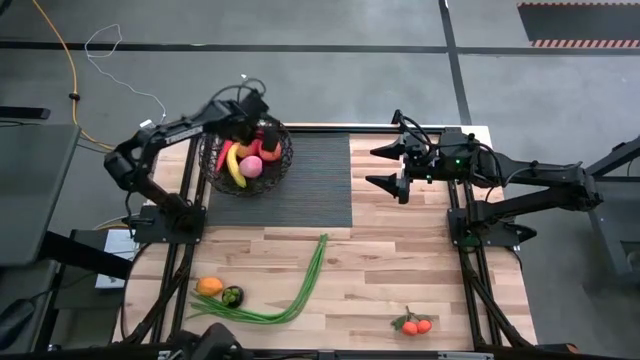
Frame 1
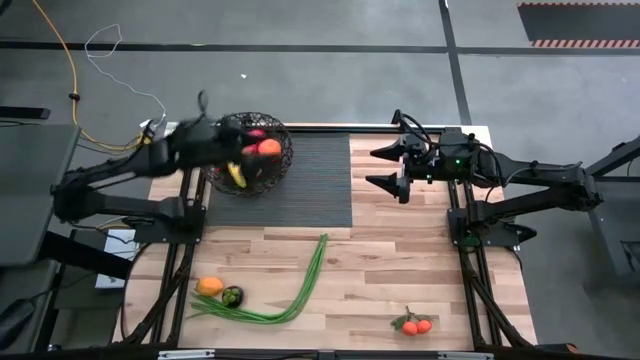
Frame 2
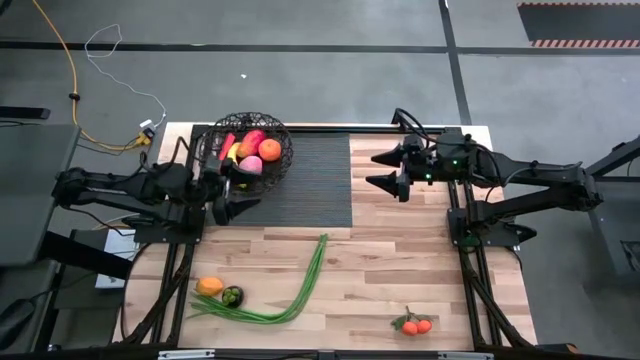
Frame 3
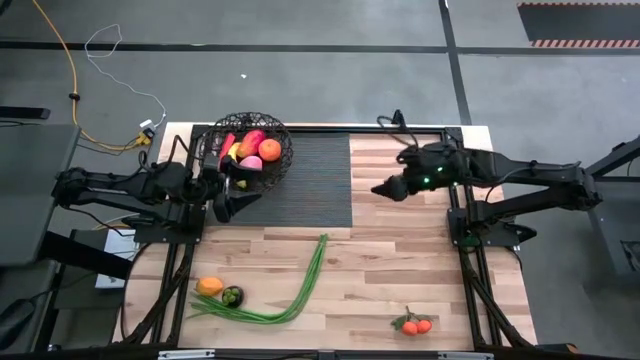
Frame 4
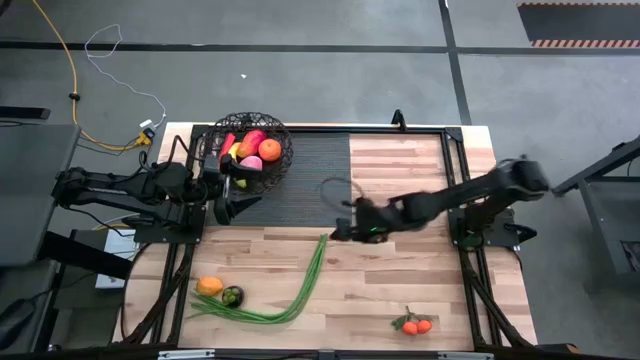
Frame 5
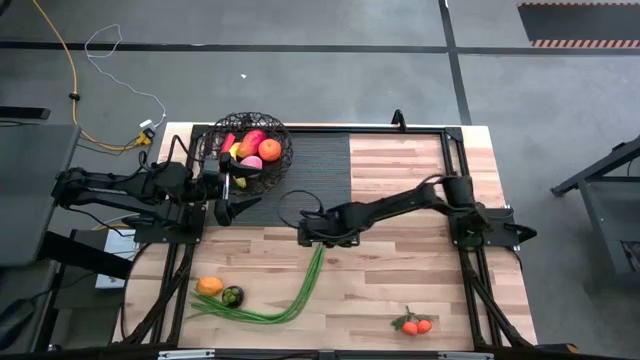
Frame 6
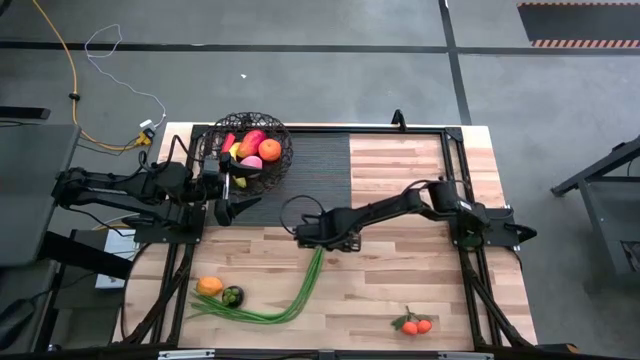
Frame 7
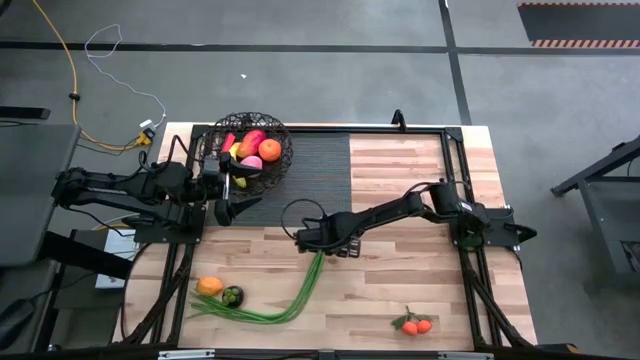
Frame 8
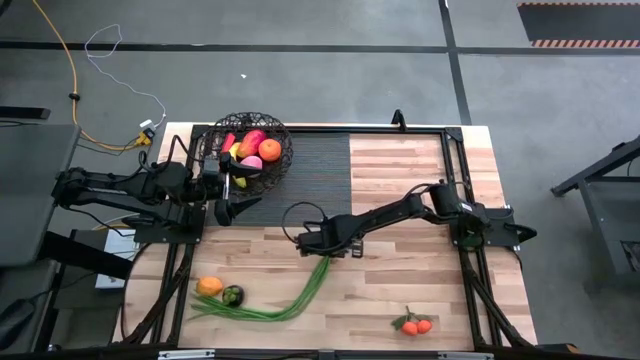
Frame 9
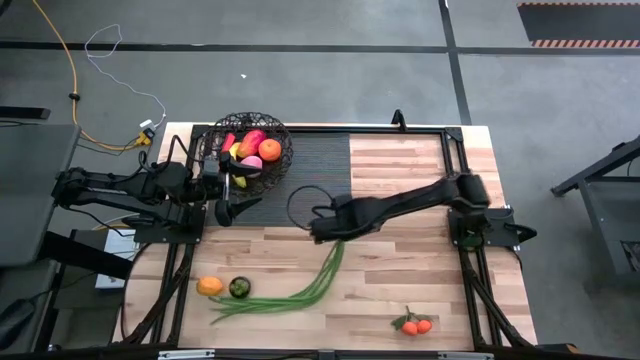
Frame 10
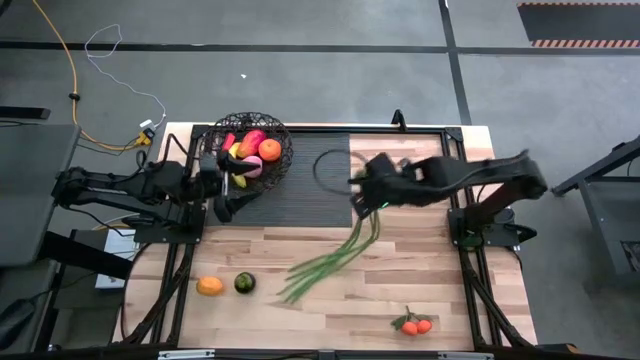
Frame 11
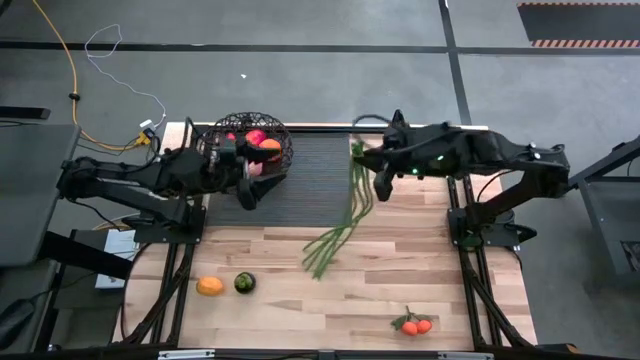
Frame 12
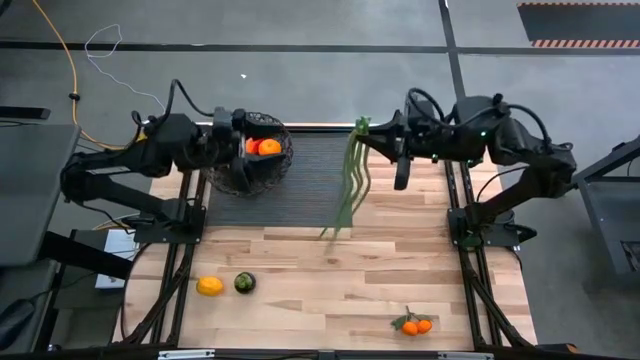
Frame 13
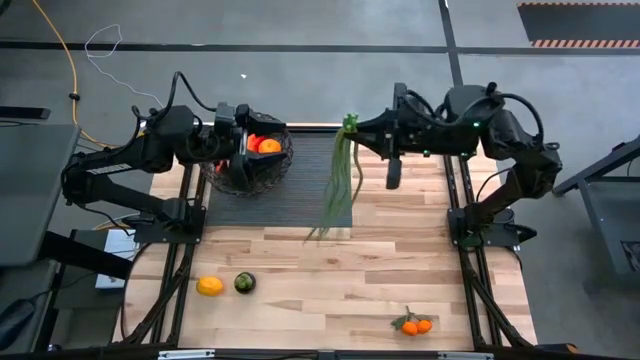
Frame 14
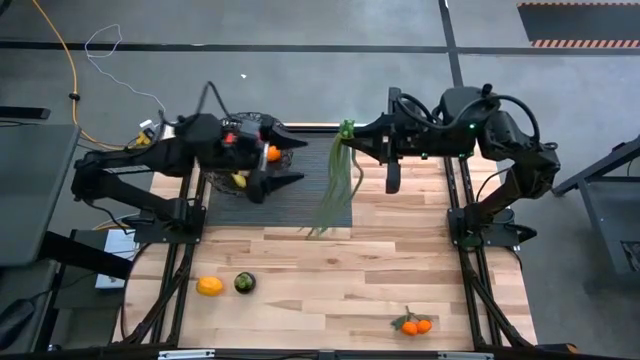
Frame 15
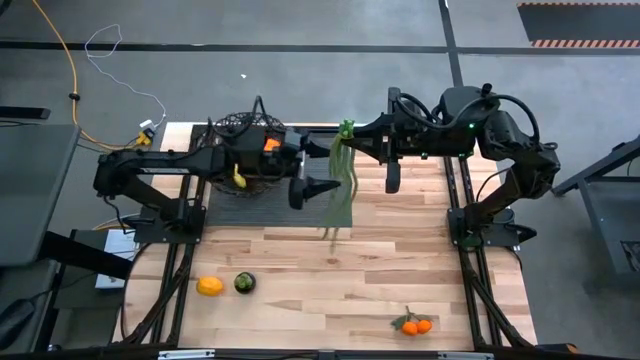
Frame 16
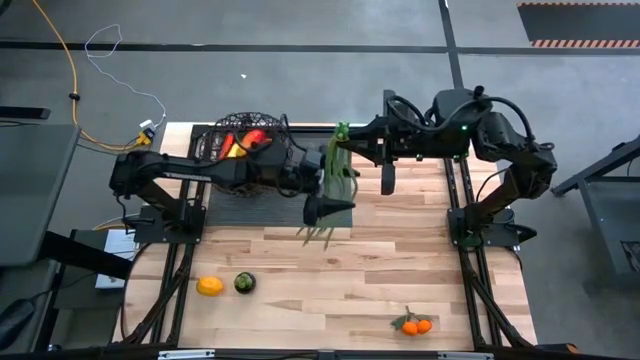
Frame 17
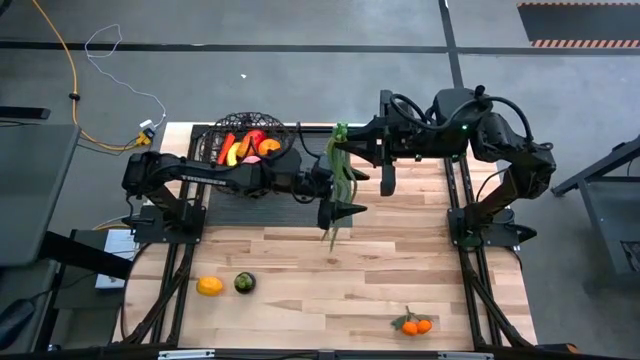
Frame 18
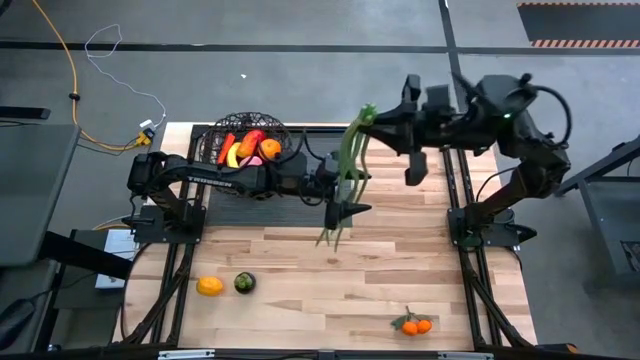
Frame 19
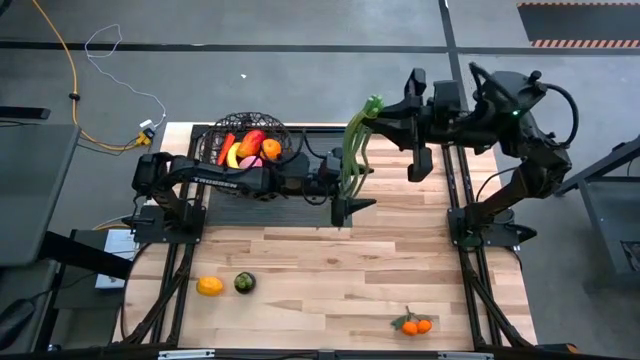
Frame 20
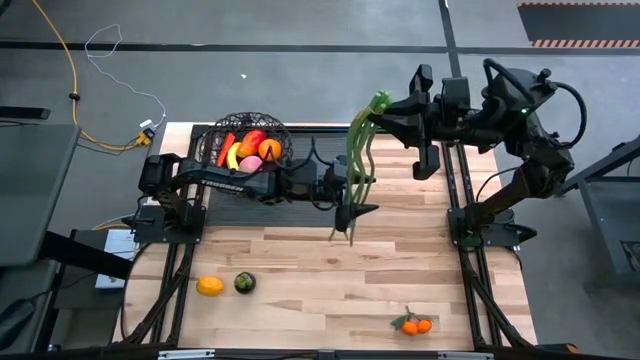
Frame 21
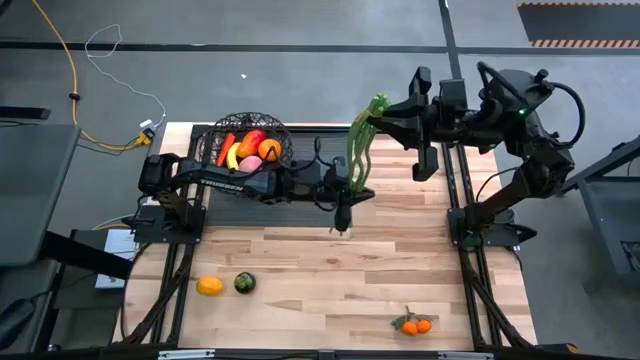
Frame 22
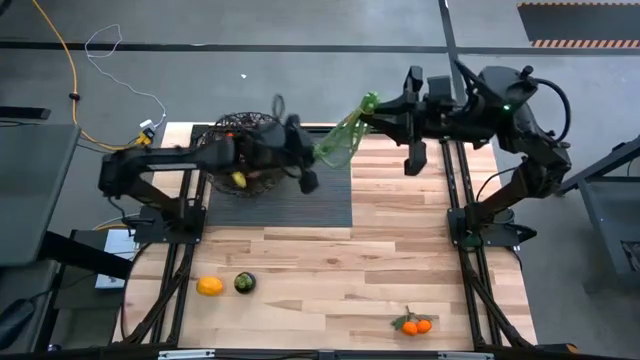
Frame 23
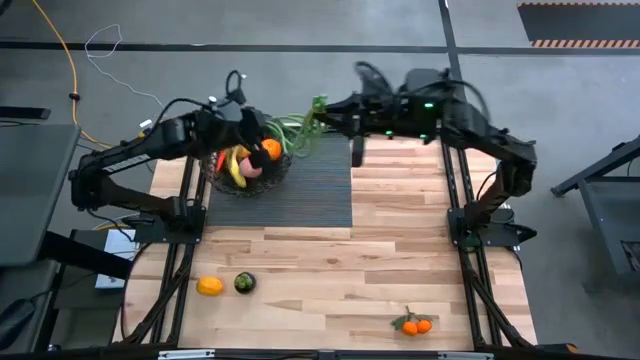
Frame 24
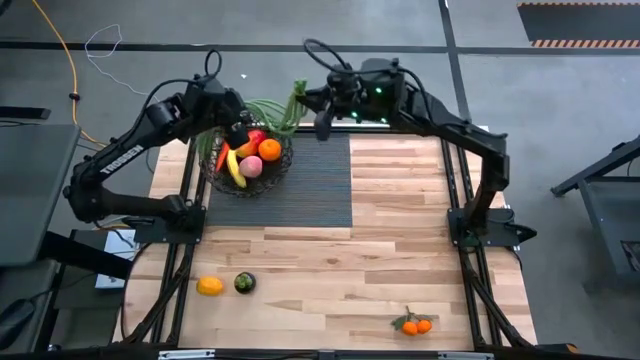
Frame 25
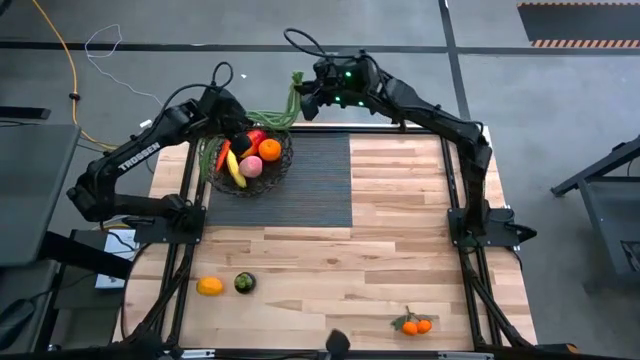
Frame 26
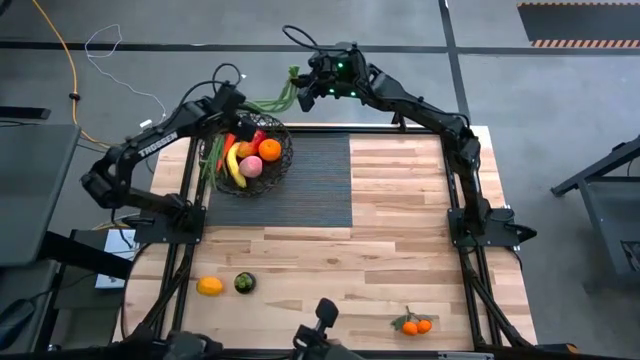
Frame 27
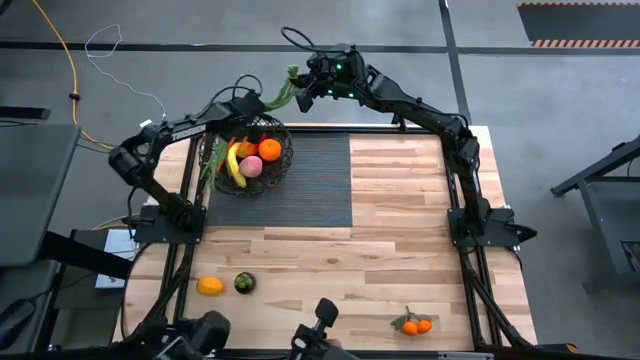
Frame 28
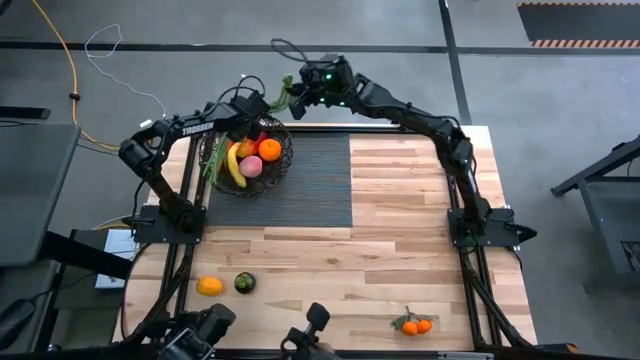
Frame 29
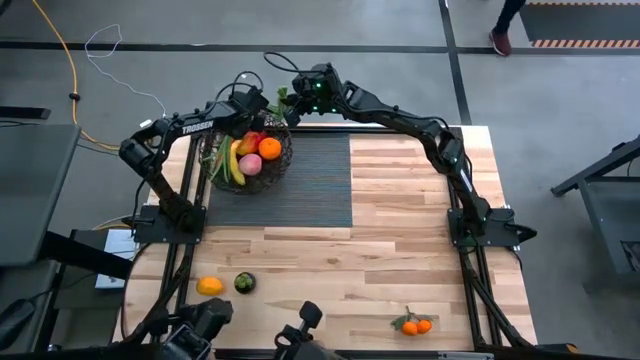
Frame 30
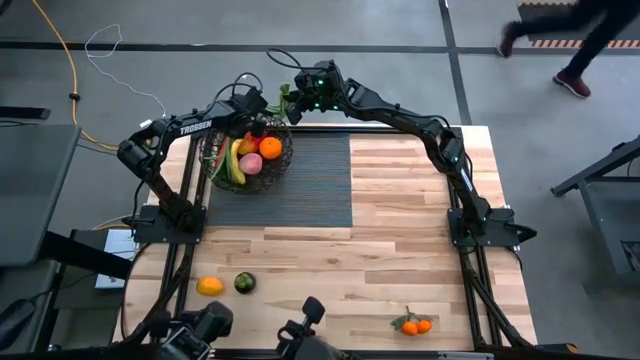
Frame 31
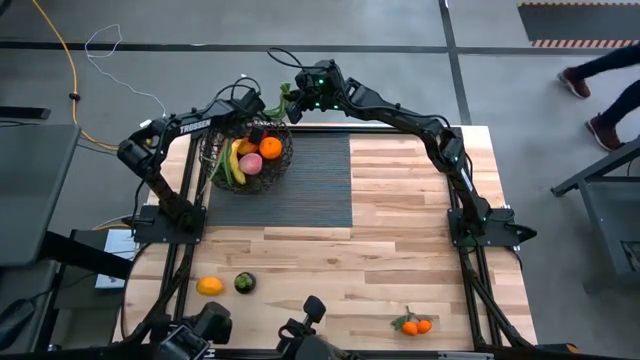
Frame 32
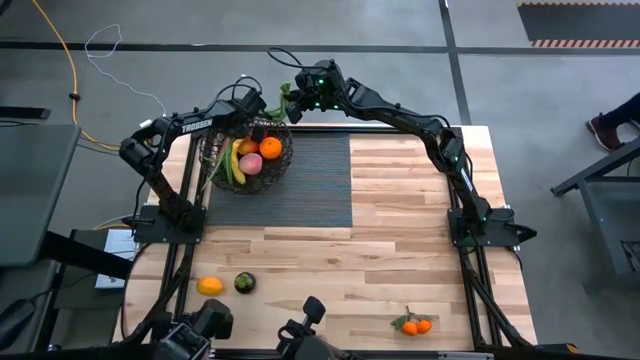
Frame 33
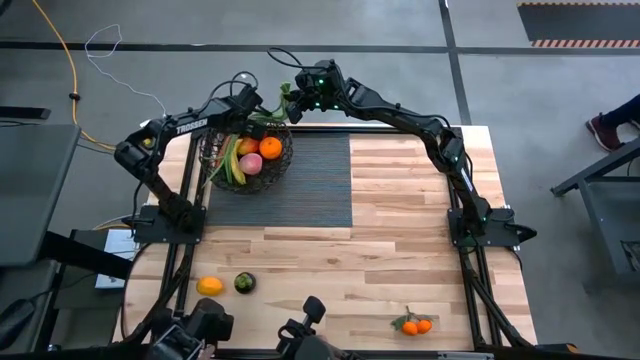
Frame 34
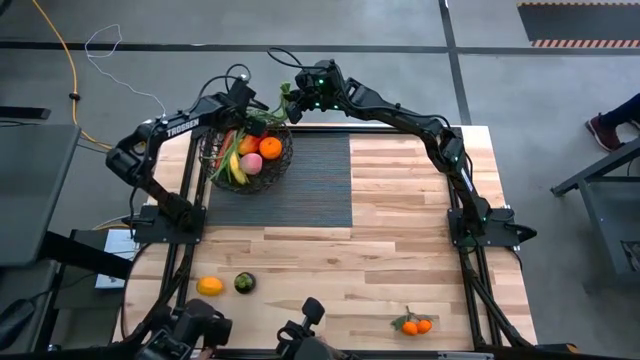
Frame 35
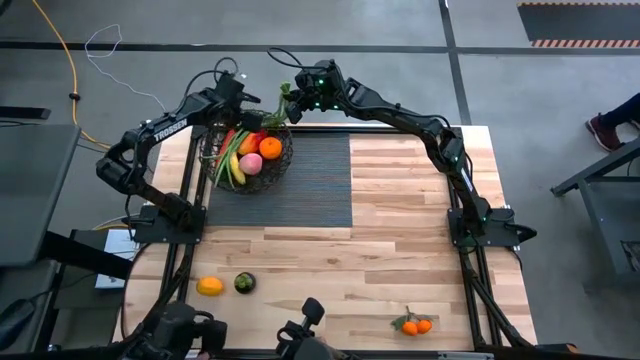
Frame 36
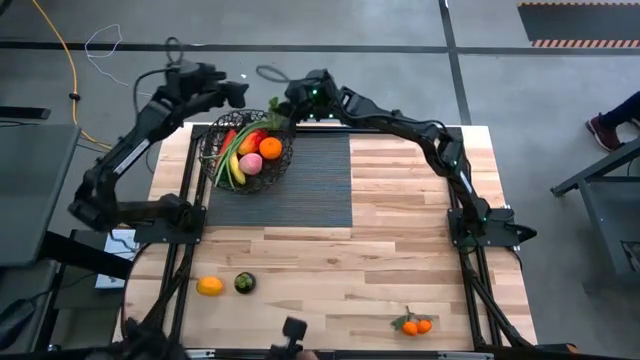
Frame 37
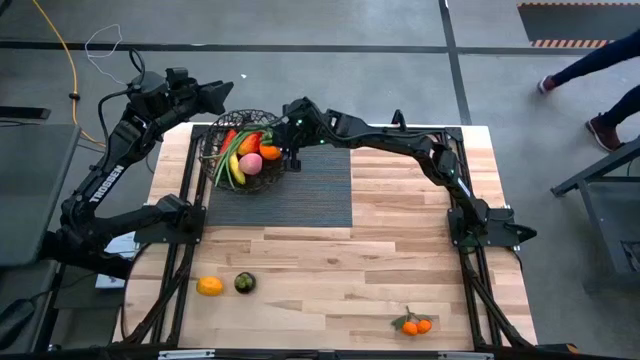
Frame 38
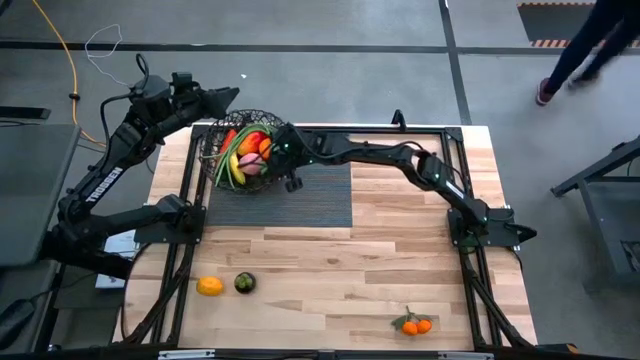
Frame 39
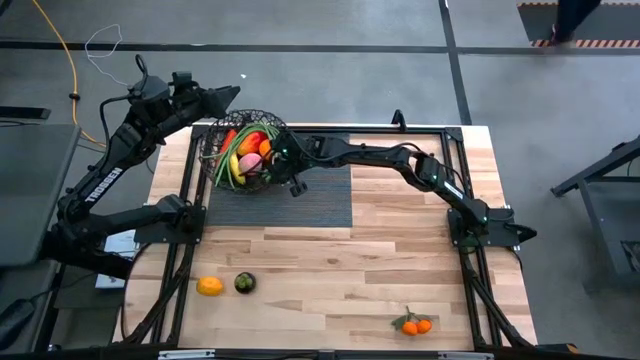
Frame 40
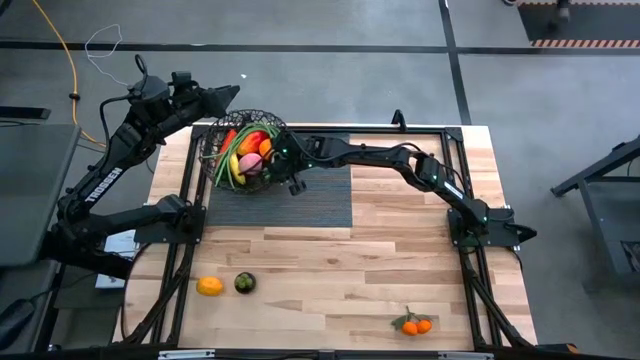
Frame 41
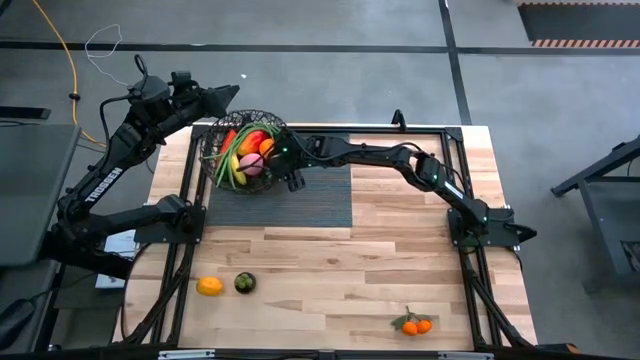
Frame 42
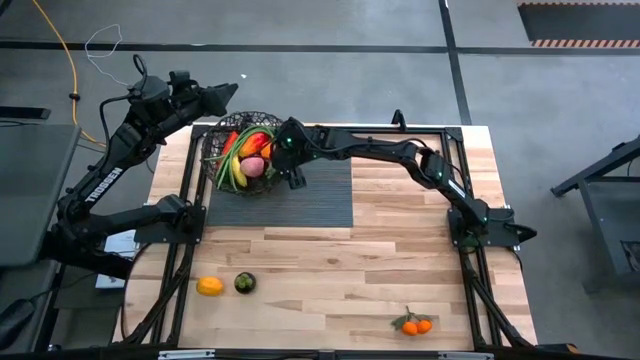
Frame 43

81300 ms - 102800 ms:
Task: Build produce basket
Put the green beans into the black basket

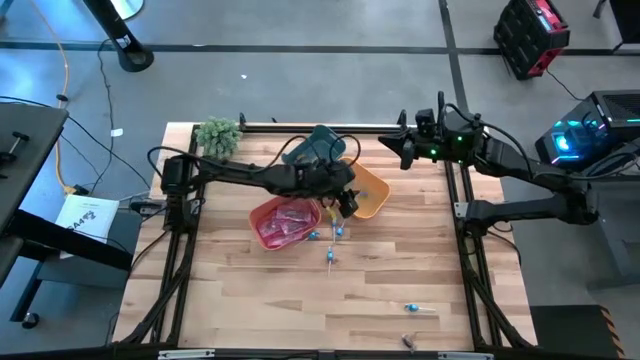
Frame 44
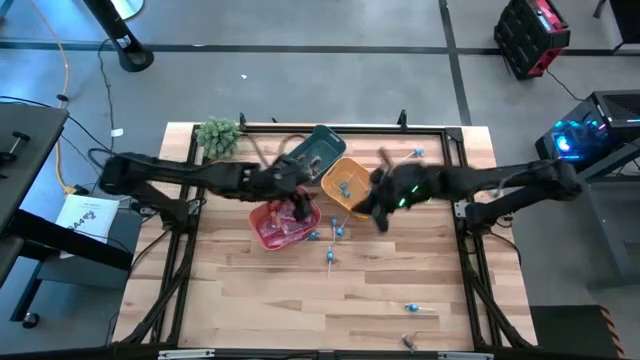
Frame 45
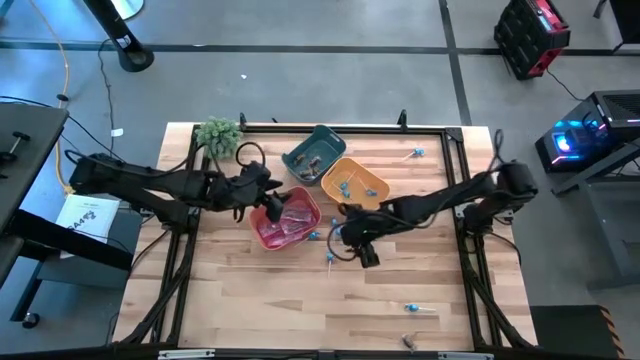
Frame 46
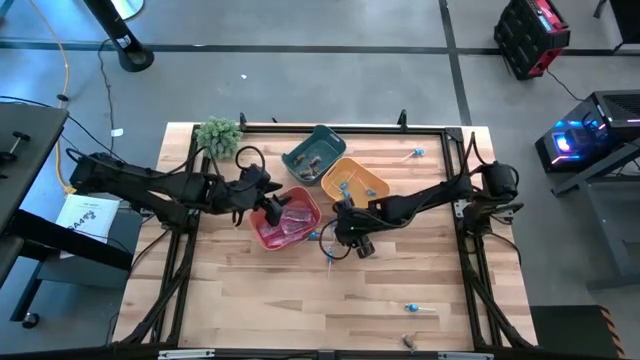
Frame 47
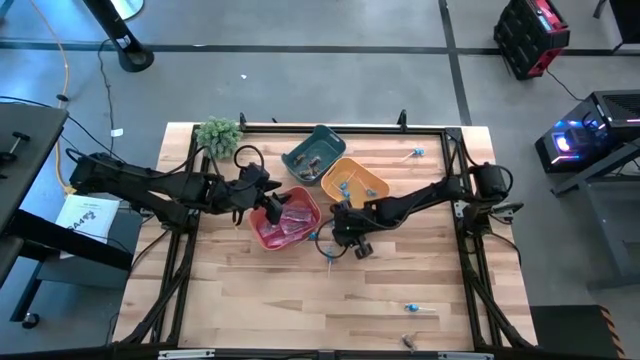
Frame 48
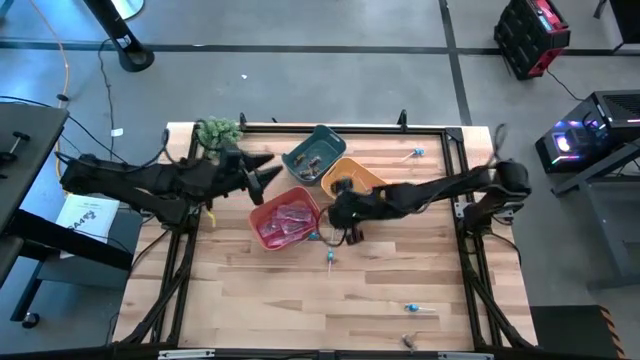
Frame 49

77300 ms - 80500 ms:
Task: Sort candy
Put the blue candy into the yellow bin
